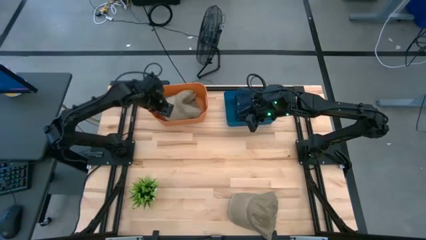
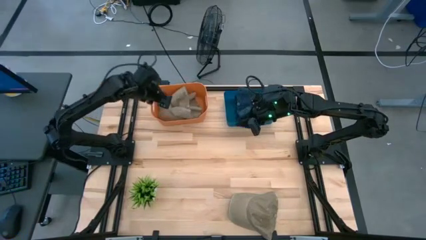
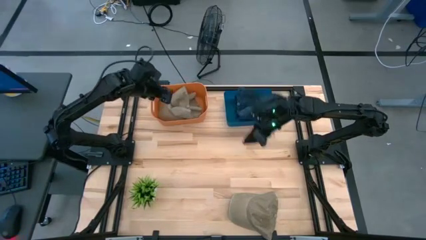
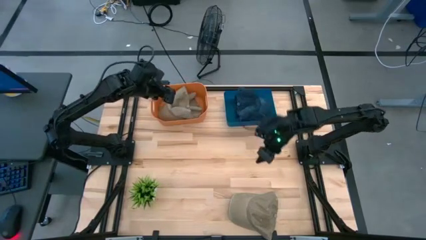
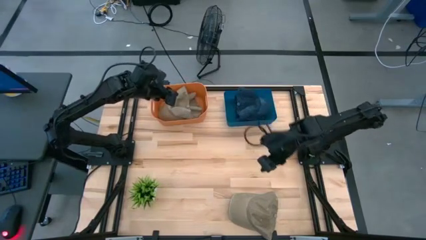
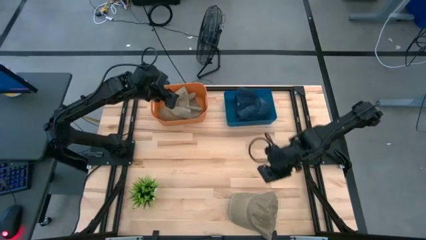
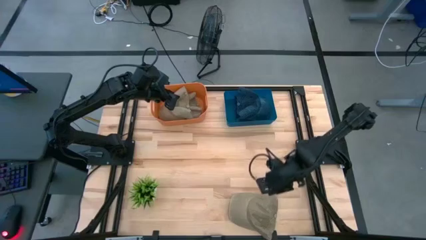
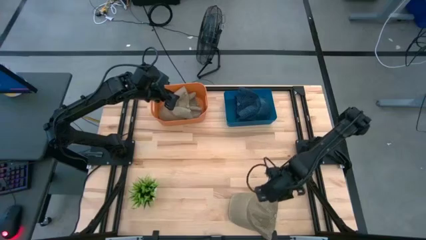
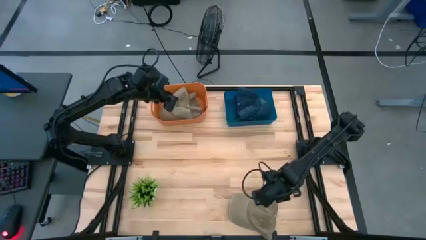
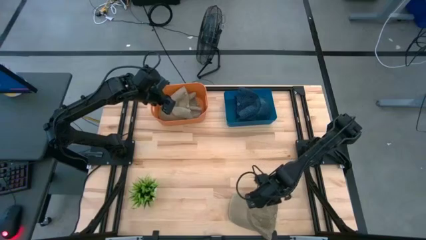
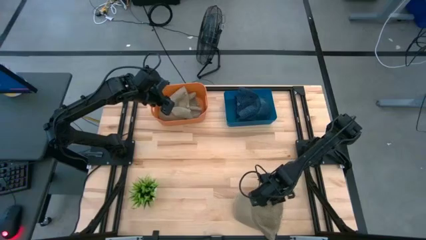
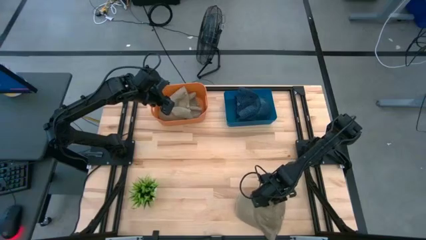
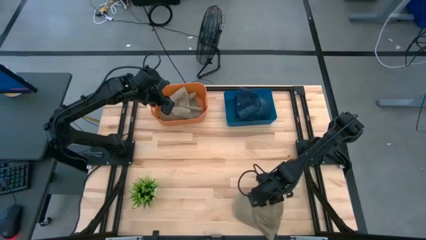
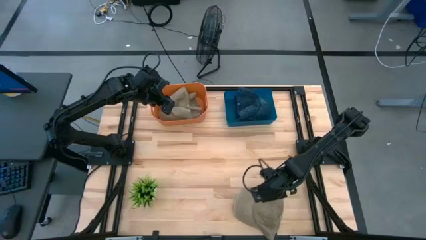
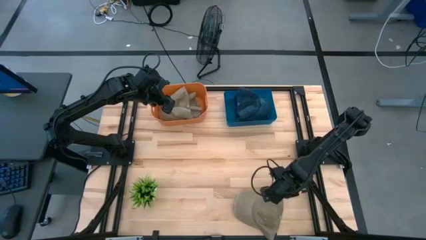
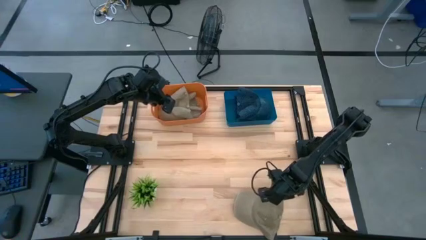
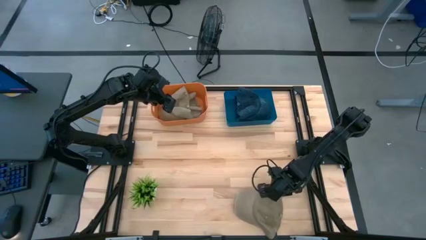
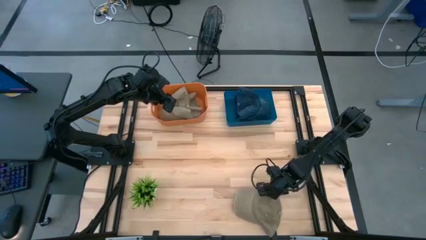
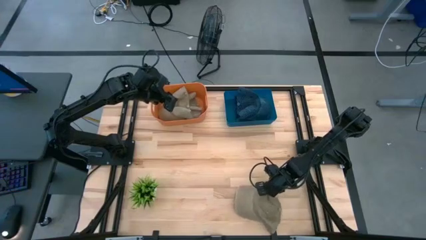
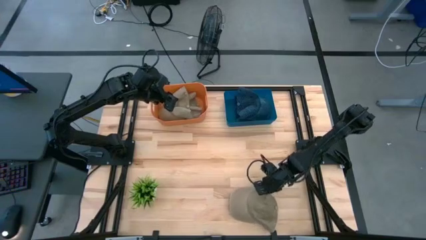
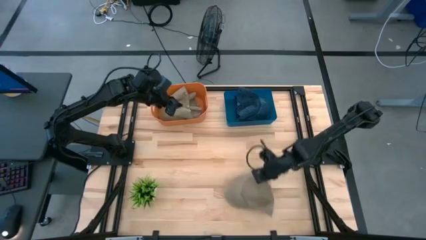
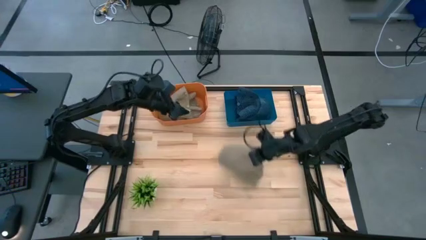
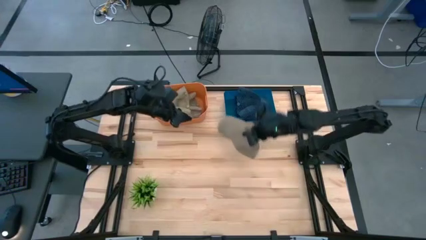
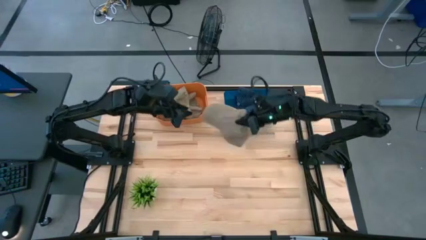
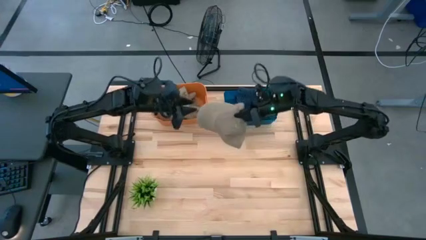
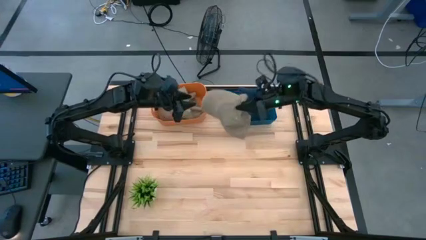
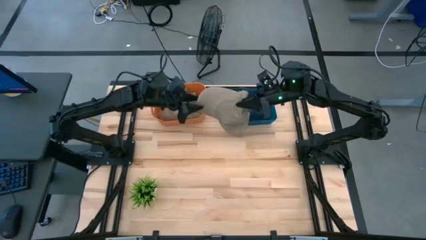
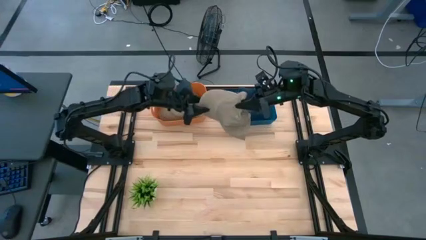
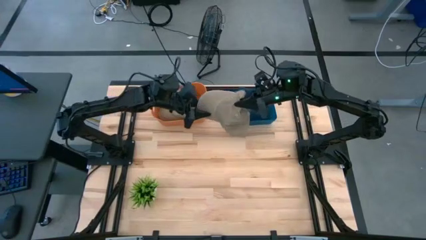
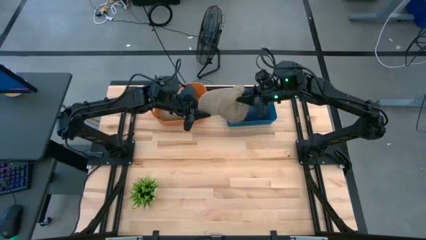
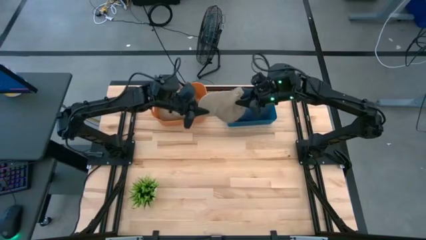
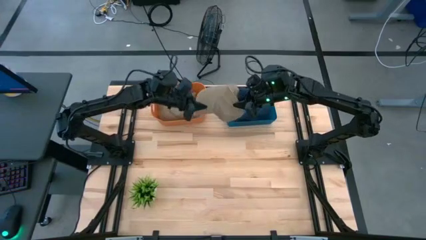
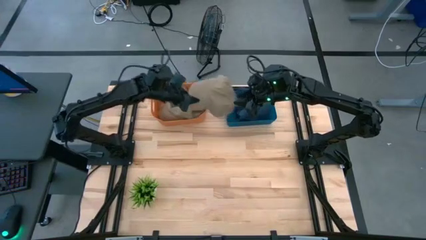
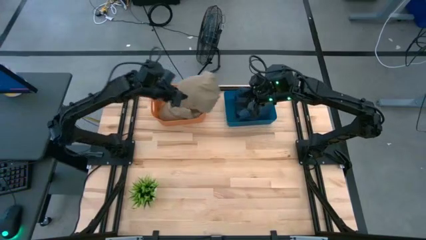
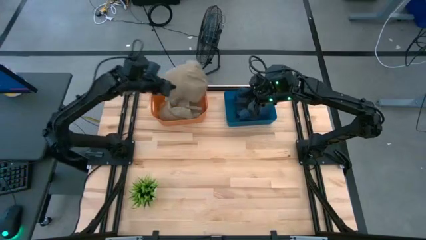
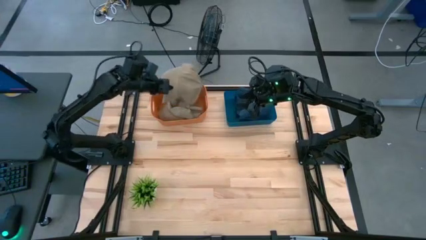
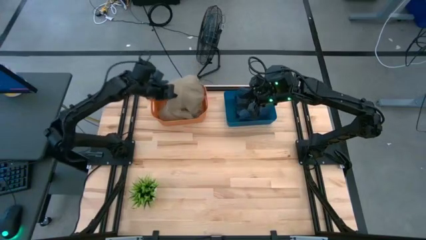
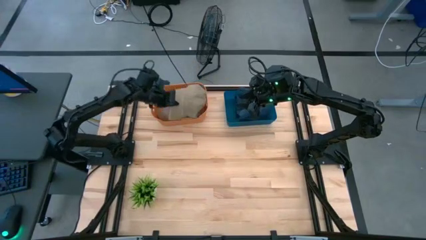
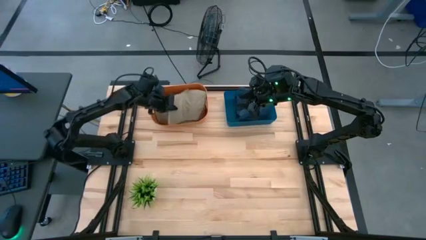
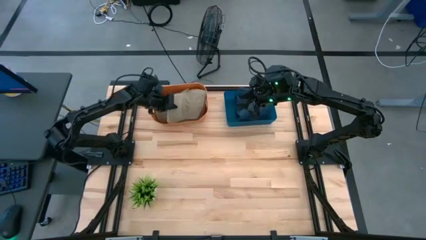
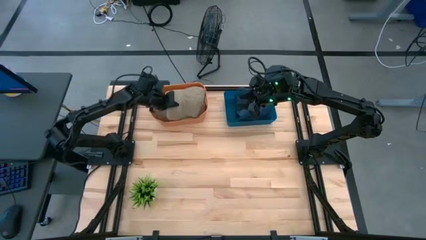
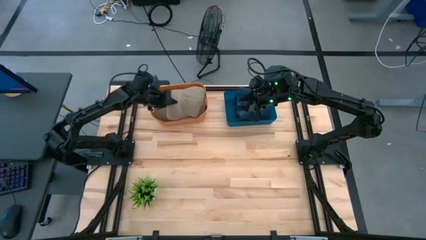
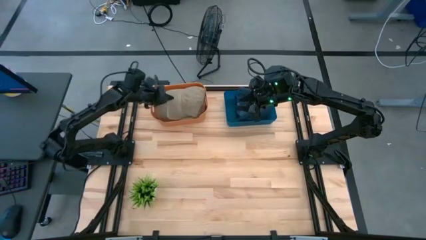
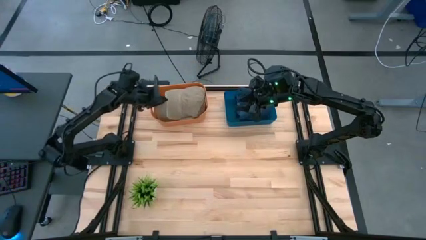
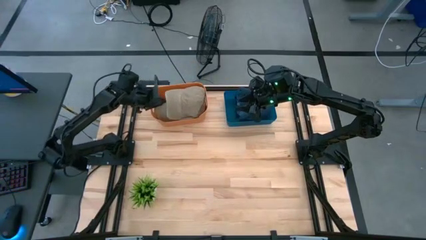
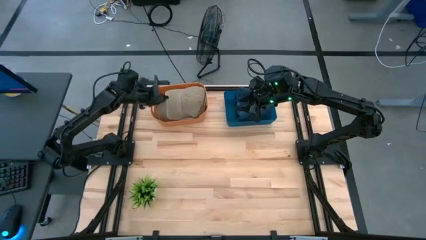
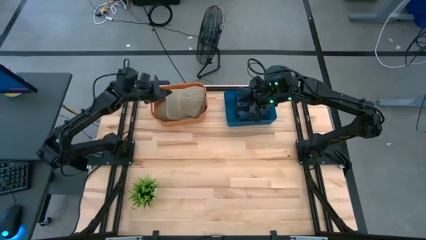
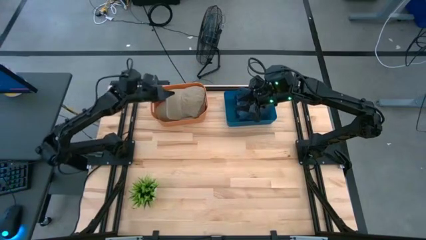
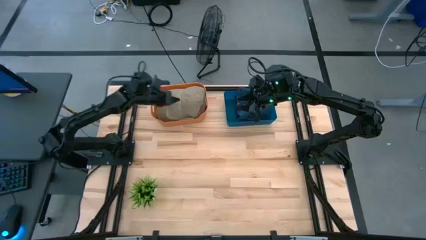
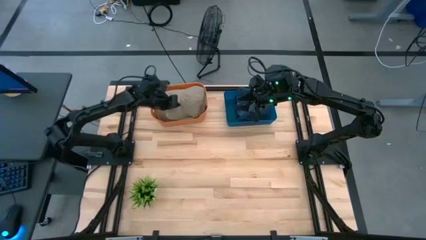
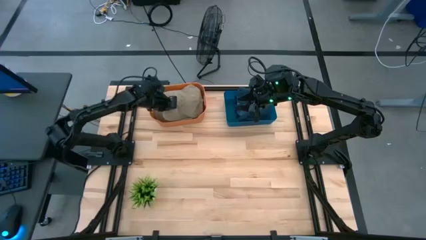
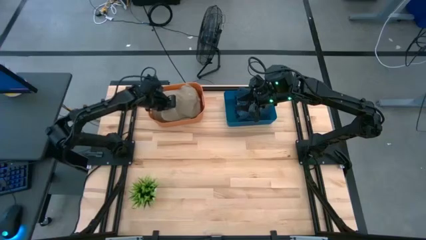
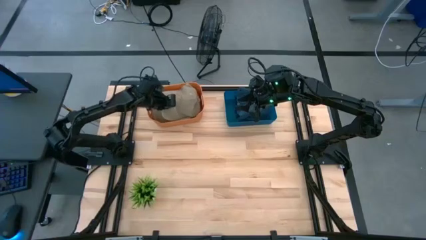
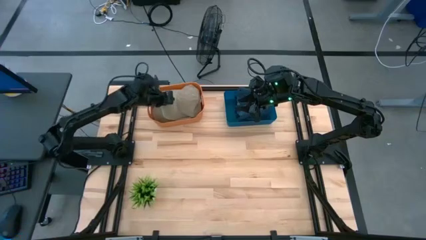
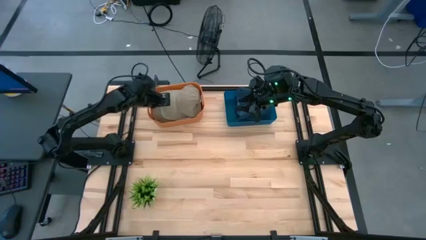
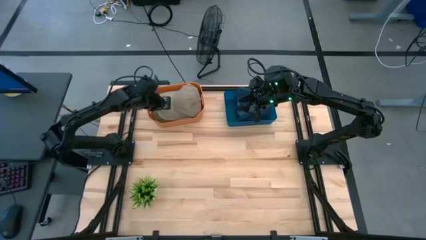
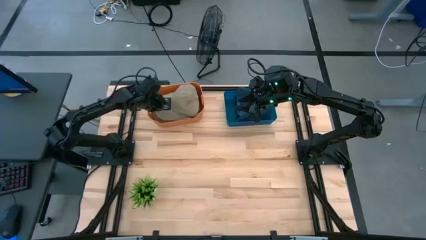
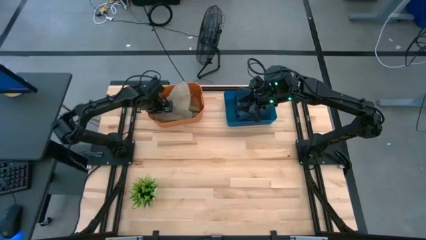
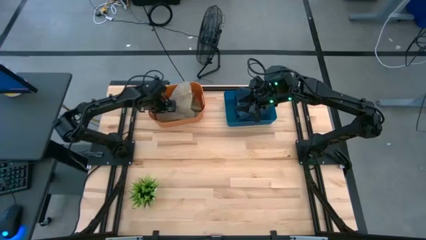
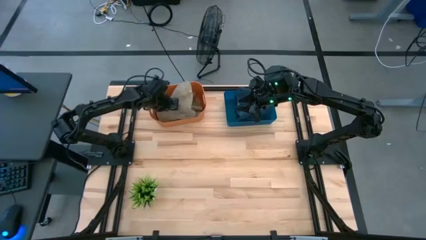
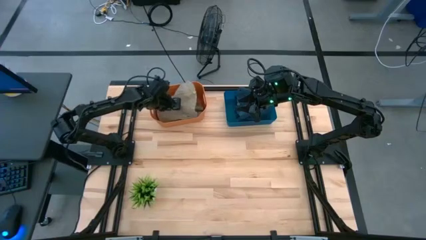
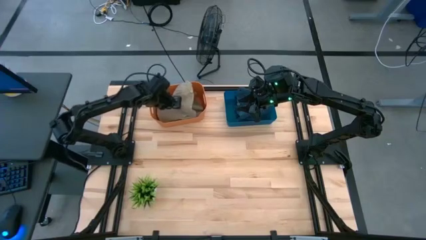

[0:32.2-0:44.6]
Task: Pick & Place hat
Put the brown cap into the orange bin
